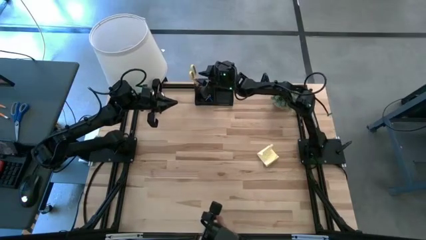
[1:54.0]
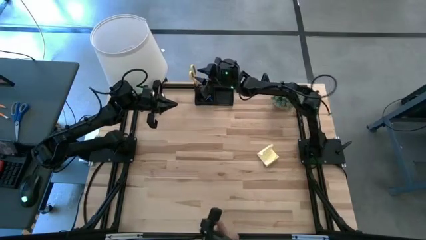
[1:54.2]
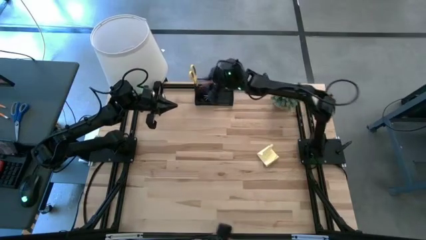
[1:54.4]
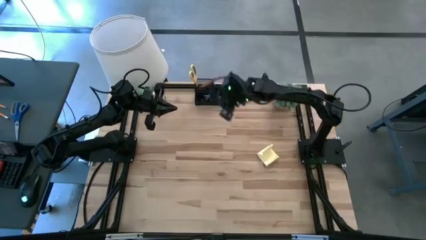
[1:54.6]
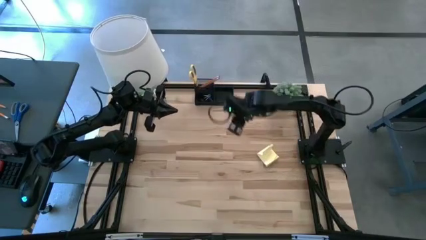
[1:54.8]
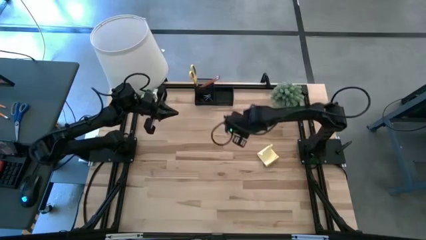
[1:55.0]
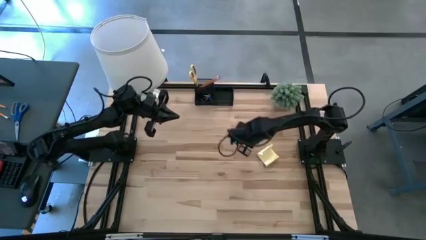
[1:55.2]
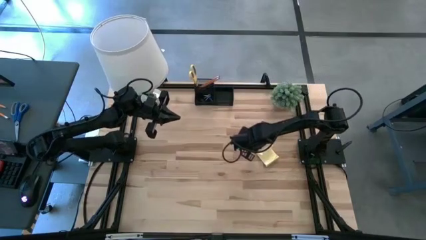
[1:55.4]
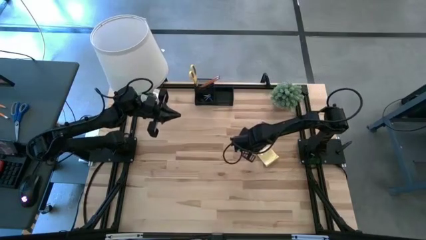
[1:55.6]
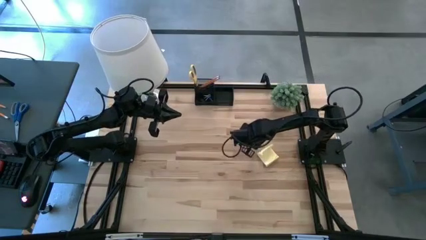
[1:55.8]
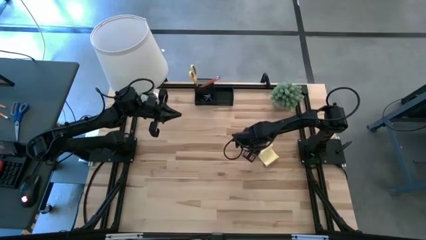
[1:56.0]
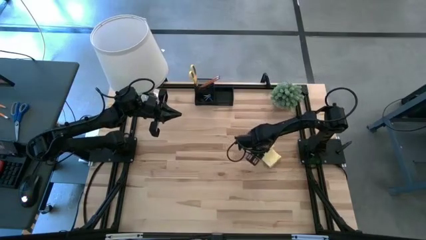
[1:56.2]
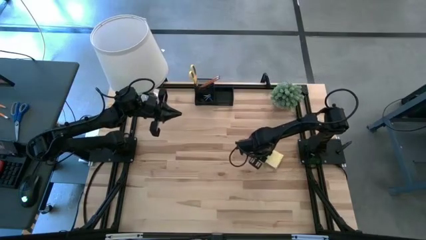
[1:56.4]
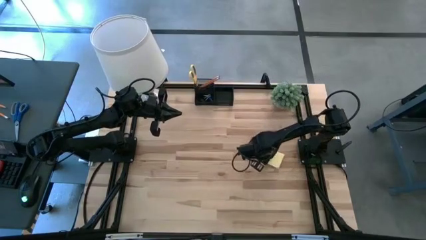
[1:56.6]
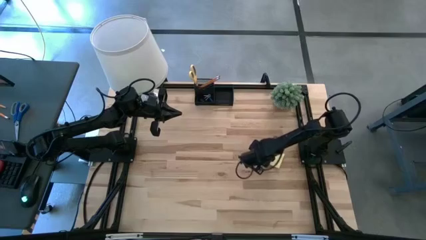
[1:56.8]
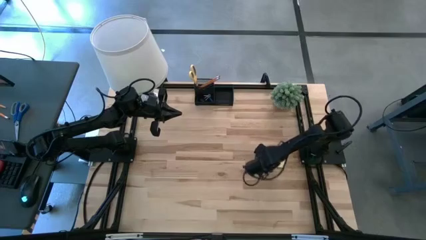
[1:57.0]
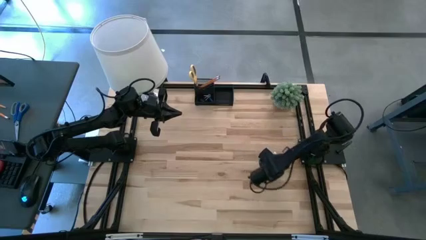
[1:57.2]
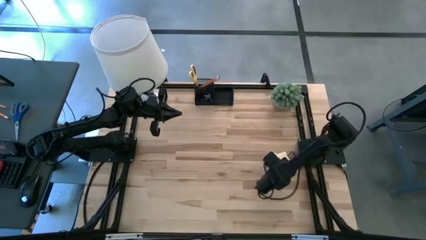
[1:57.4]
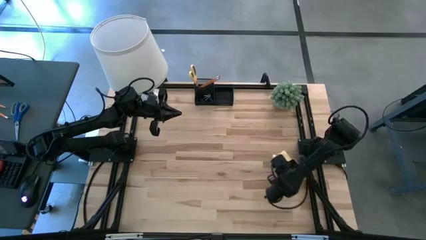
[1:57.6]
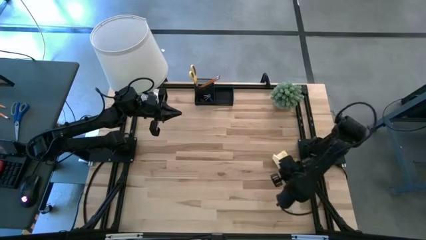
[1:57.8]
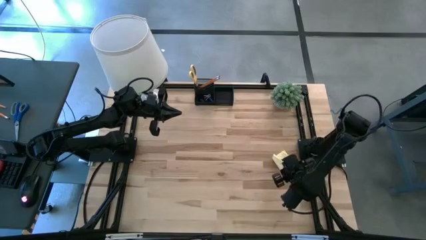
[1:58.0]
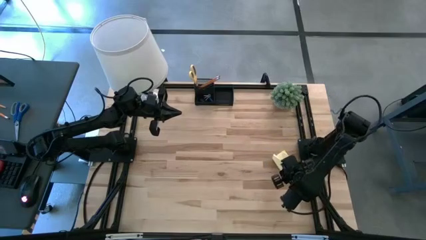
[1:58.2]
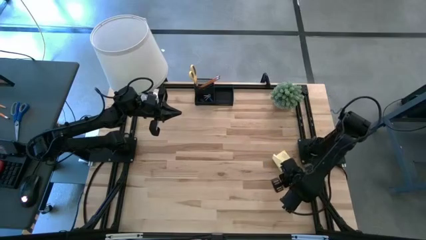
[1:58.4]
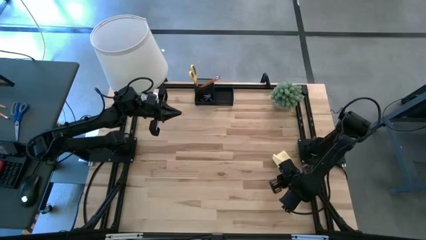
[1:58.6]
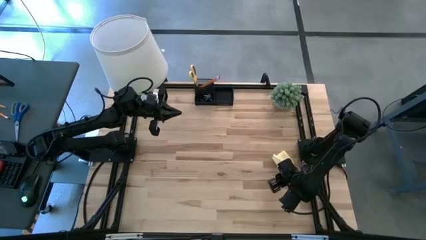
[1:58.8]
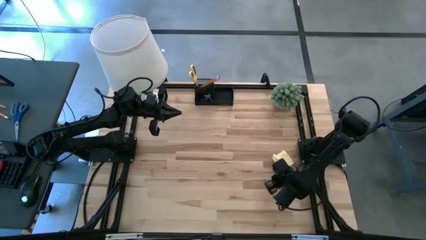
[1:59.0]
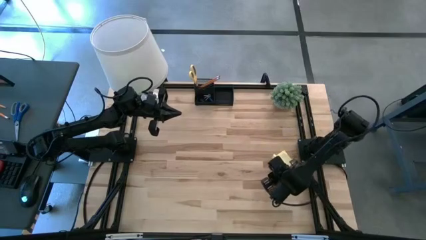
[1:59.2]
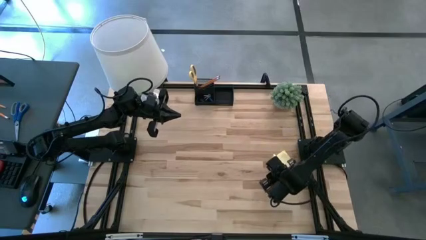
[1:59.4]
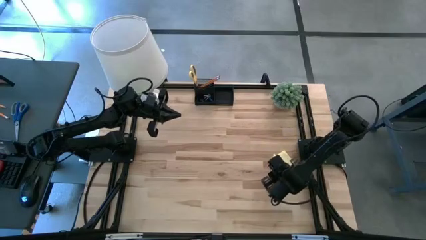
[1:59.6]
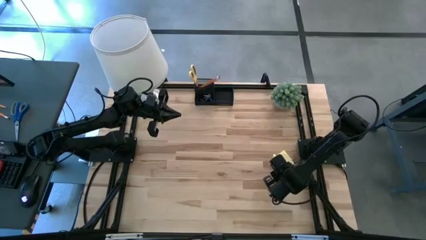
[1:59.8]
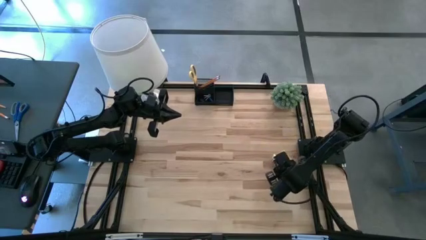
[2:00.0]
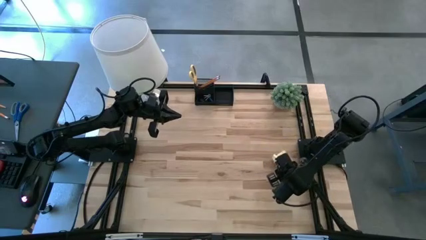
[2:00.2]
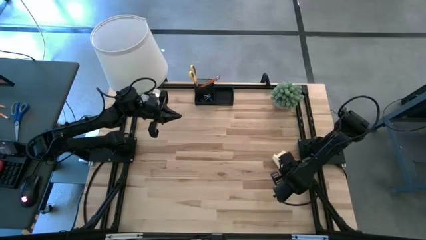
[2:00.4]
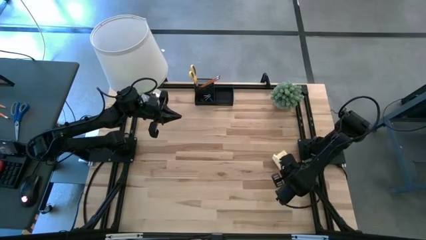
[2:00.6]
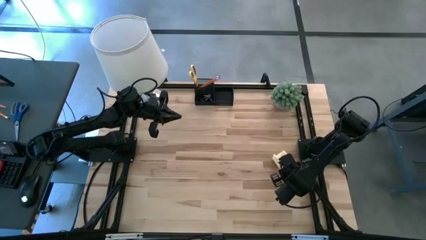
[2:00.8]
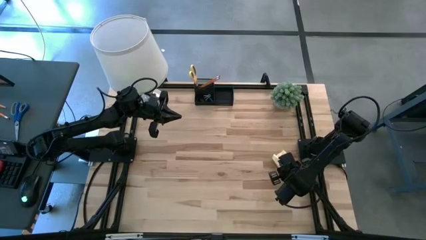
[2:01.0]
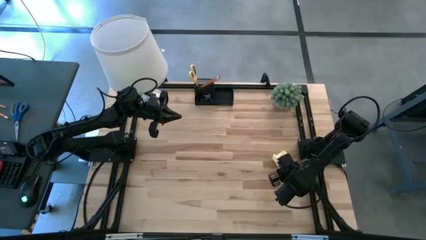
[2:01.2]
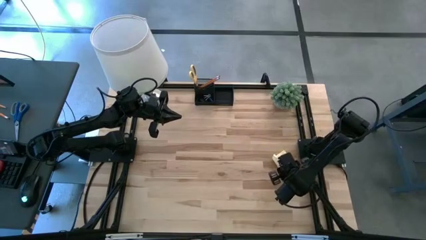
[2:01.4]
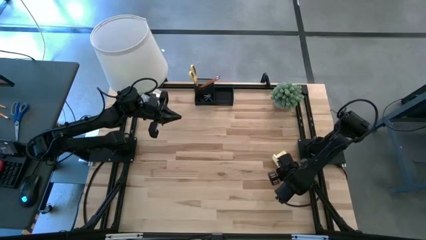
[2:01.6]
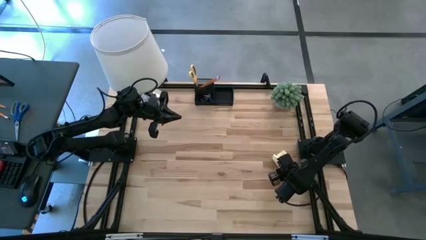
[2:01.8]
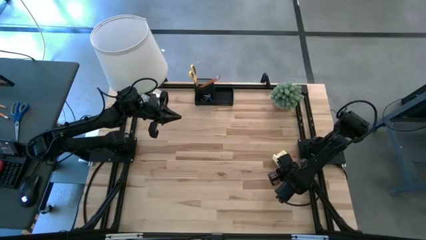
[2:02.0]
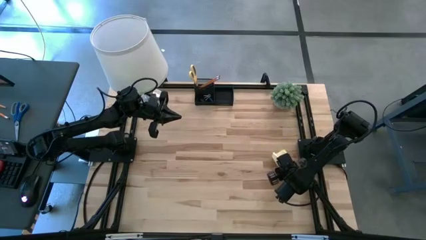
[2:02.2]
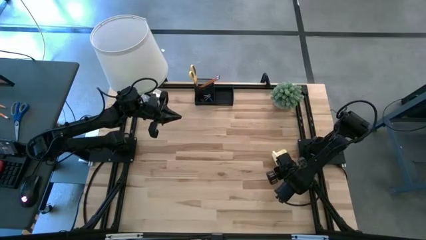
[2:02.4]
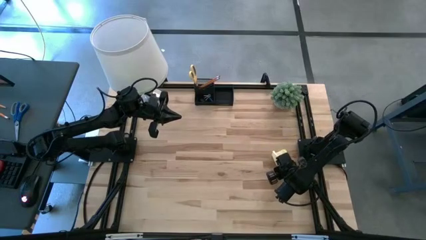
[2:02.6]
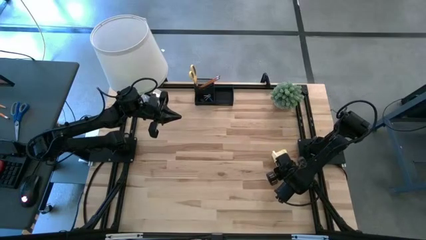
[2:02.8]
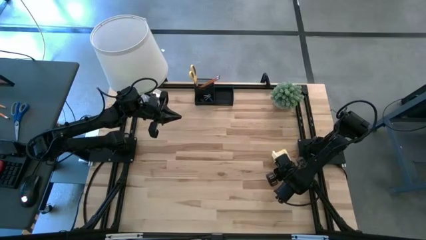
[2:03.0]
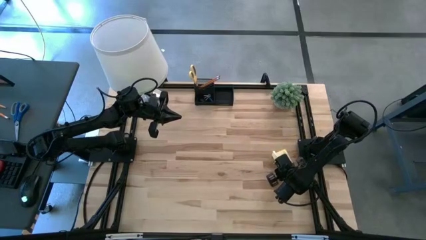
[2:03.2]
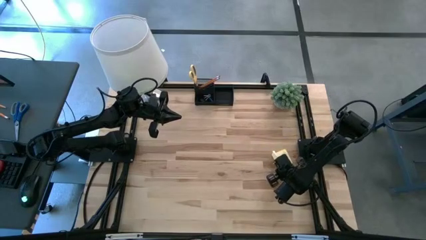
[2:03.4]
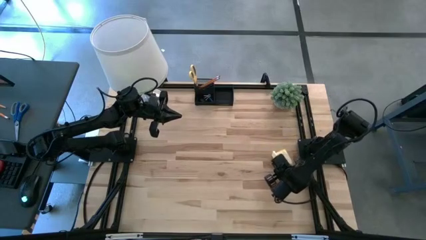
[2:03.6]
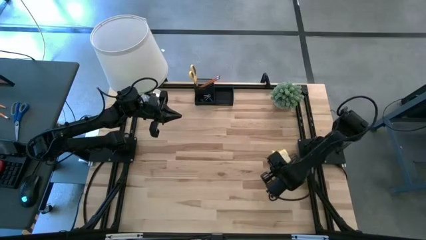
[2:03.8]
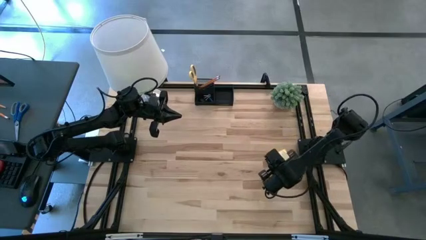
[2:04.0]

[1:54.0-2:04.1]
Task: Pick and place office supplies into organizer
Put the yellow sticky notes into the black desk organizer

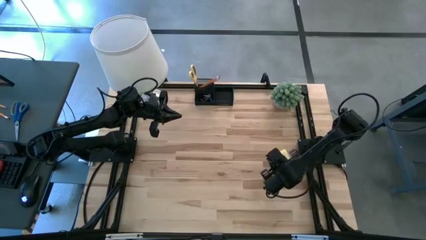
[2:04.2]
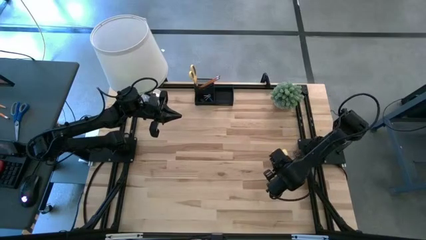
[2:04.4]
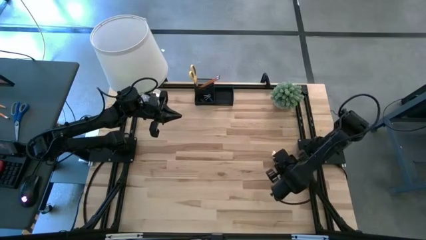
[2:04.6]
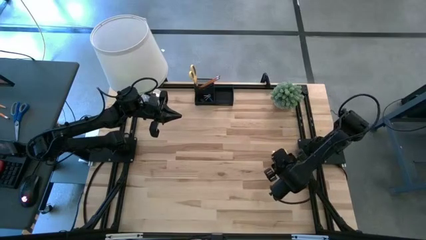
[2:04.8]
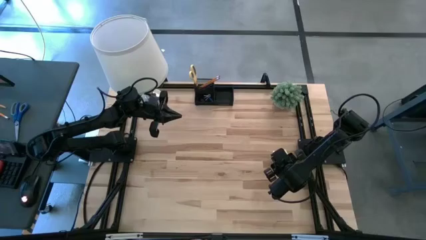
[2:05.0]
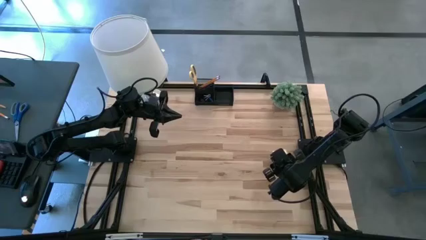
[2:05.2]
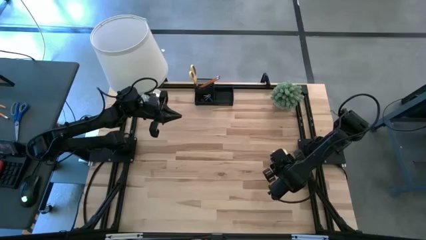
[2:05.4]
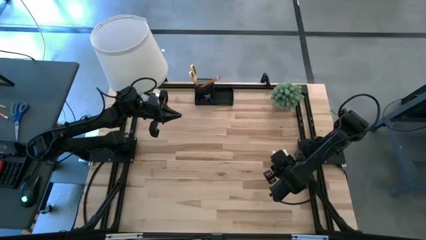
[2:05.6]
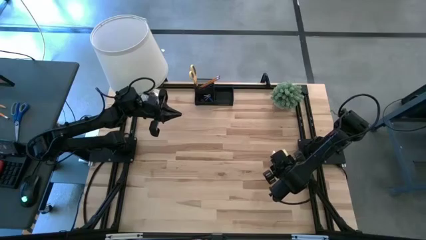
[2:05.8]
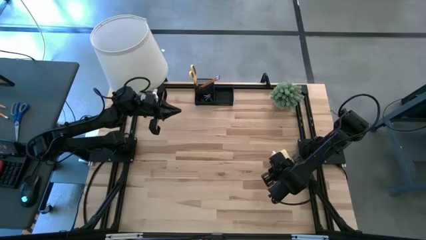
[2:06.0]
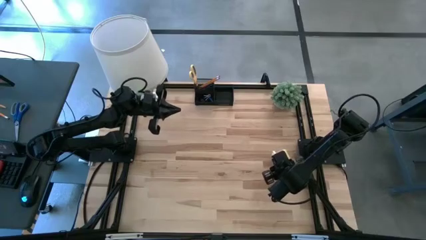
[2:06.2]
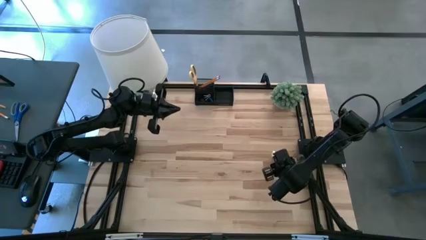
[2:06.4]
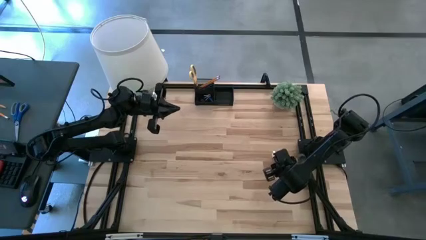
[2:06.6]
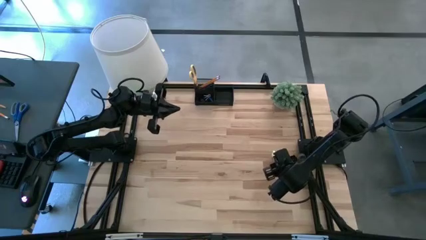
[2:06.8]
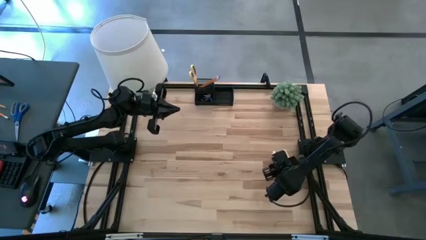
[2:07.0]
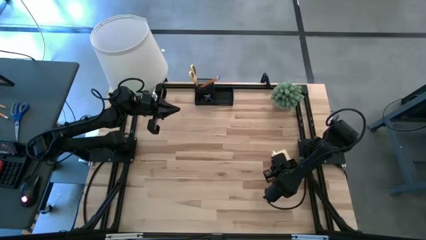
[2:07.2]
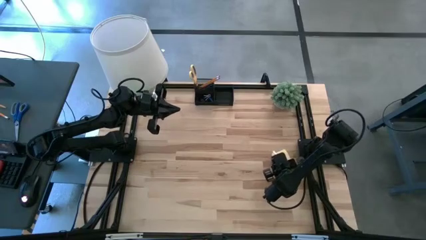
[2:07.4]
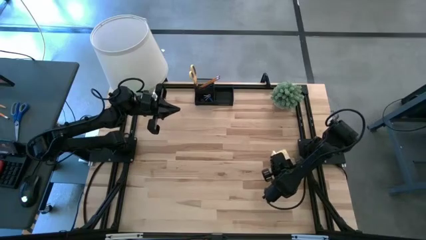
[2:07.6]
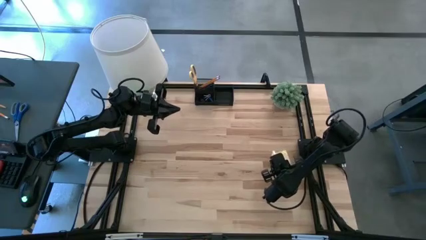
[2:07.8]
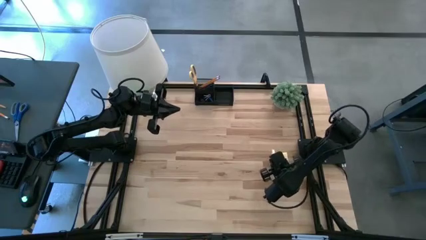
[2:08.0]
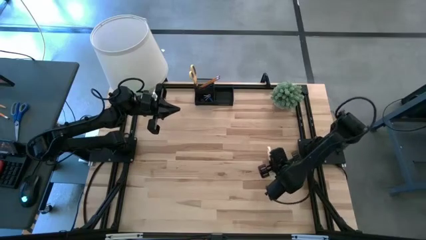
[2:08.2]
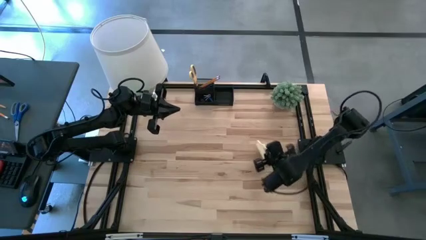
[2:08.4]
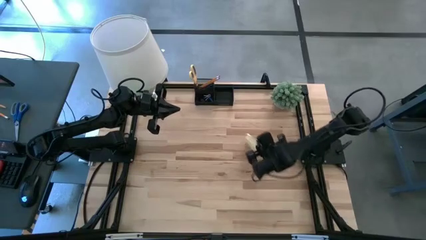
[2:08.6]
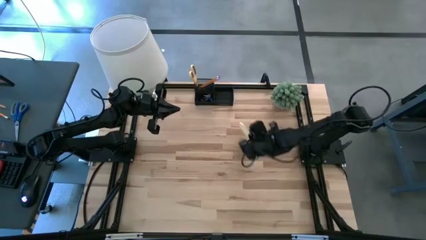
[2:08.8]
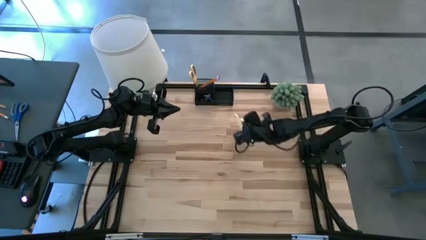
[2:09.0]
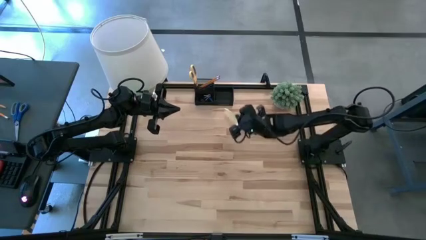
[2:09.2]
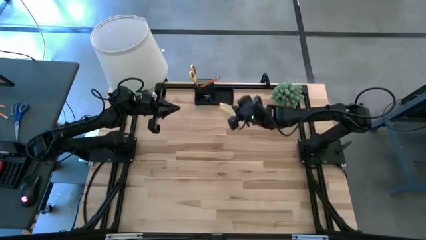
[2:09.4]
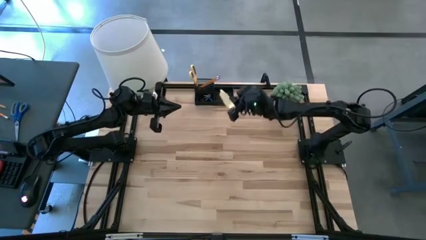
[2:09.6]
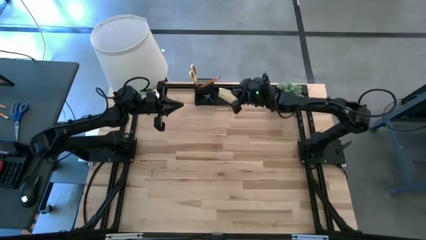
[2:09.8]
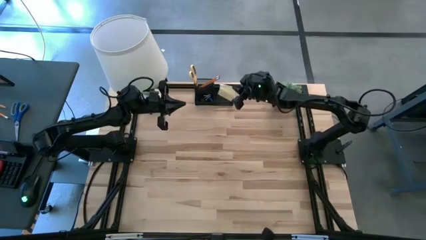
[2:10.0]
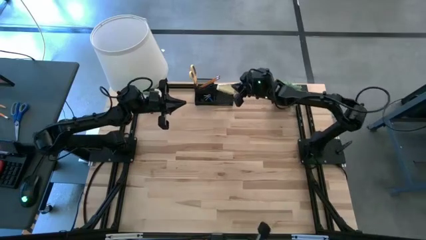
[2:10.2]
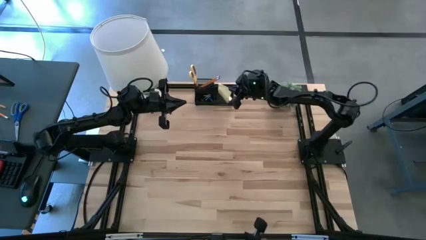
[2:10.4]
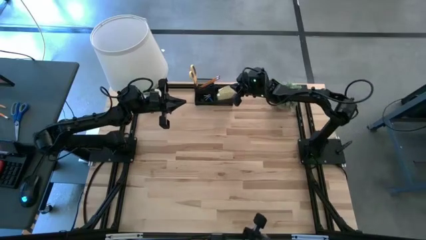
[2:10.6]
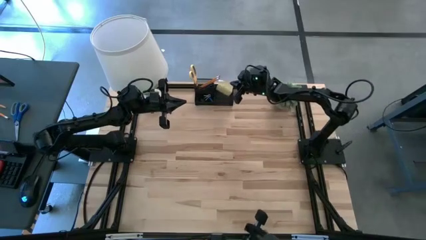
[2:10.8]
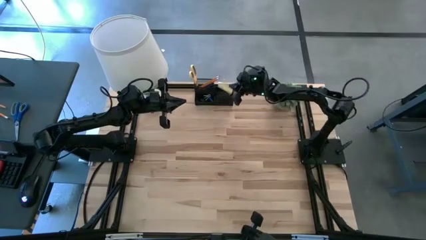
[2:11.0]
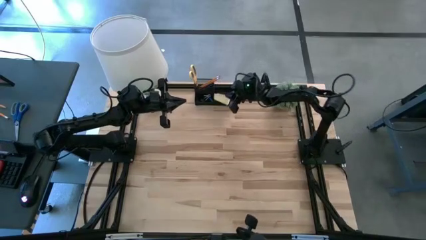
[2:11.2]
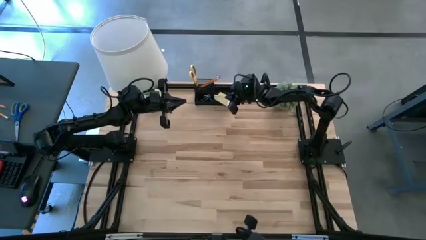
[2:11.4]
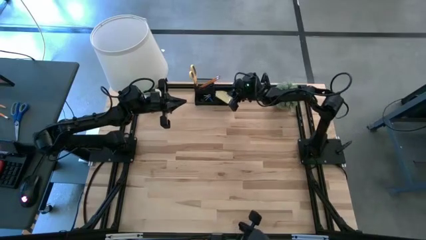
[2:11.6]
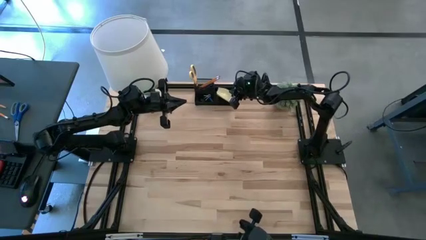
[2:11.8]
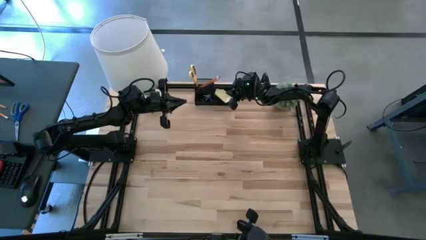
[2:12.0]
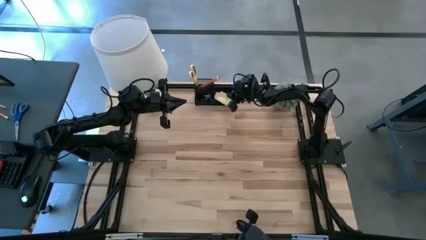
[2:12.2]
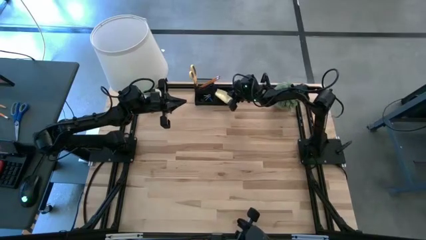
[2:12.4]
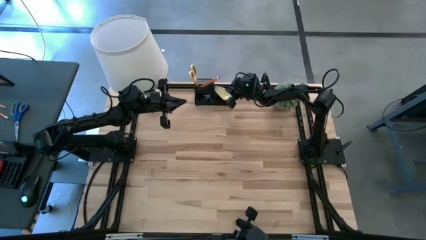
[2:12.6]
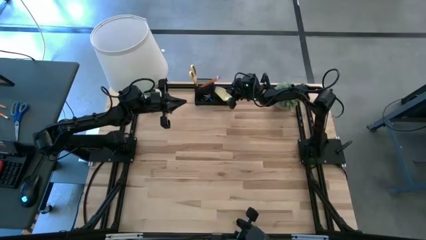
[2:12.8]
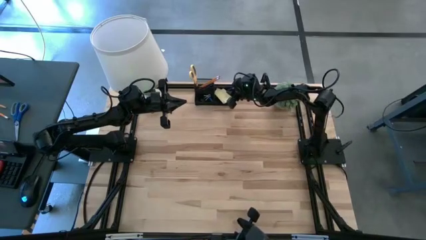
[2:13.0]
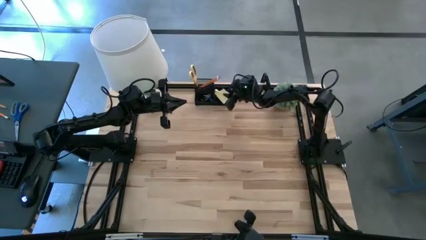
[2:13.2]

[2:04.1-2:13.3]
Put the yellow sticky notes into the black desk organizer
